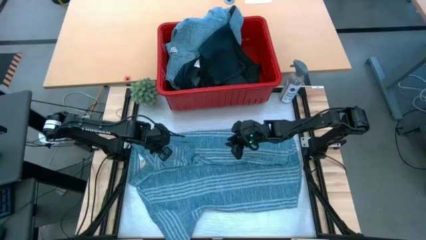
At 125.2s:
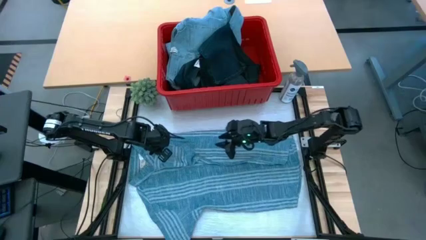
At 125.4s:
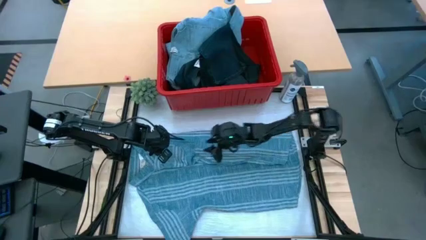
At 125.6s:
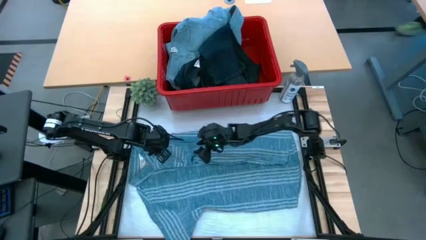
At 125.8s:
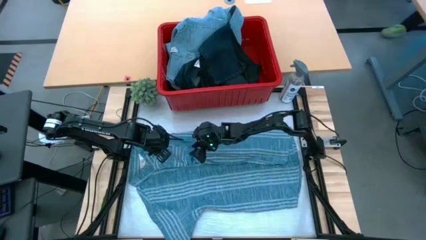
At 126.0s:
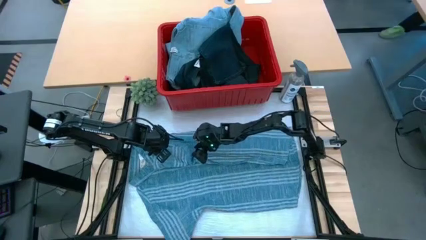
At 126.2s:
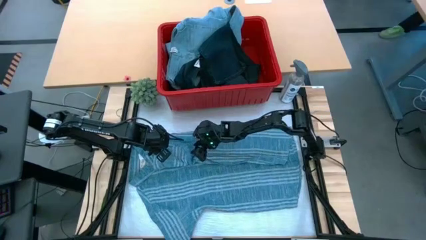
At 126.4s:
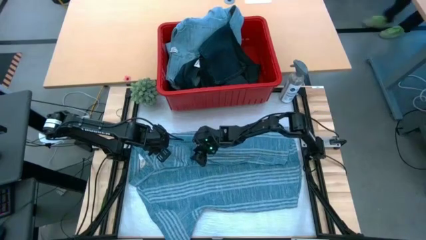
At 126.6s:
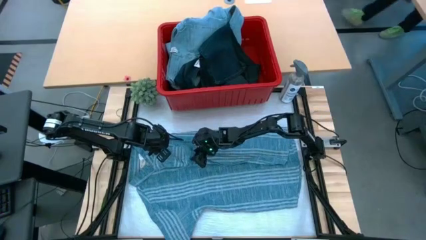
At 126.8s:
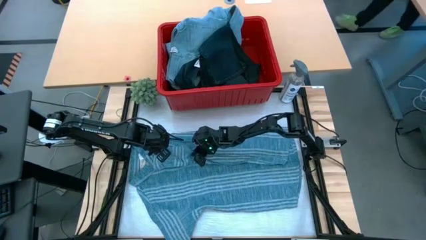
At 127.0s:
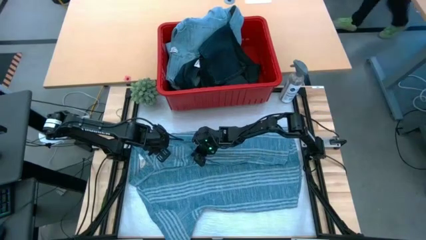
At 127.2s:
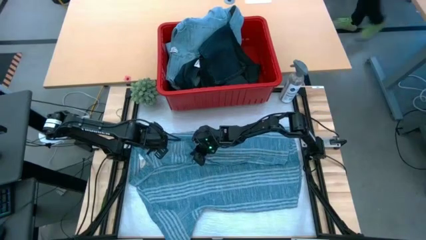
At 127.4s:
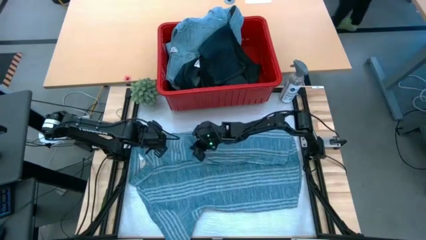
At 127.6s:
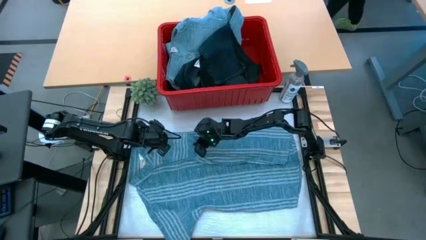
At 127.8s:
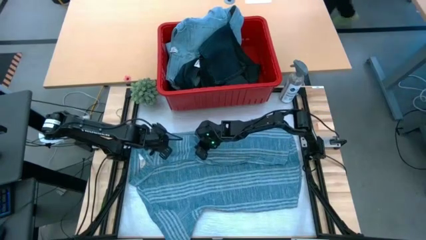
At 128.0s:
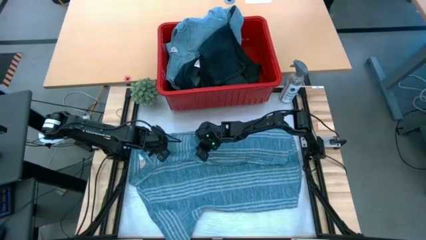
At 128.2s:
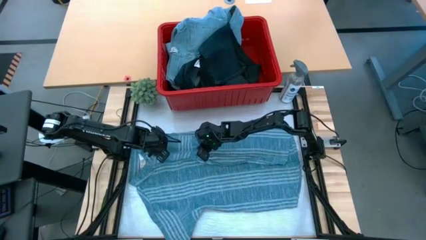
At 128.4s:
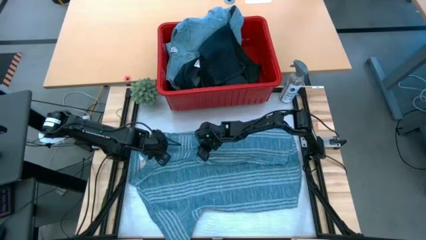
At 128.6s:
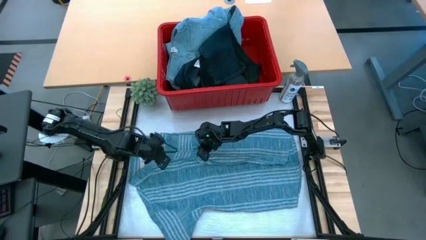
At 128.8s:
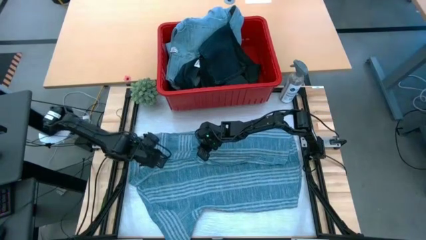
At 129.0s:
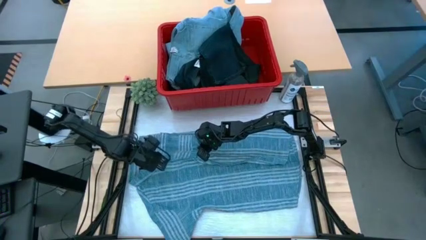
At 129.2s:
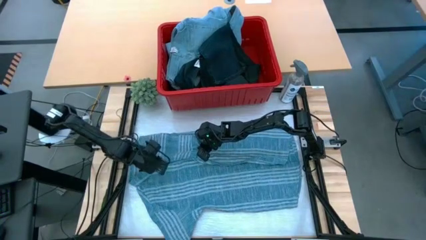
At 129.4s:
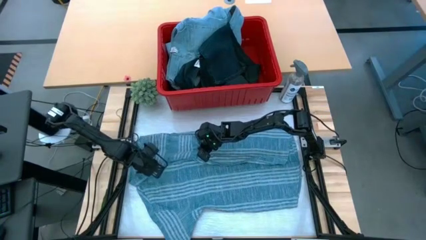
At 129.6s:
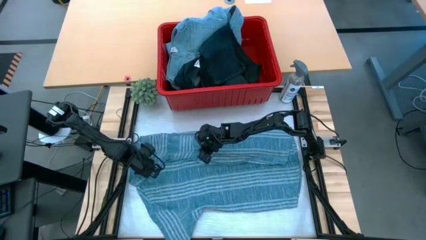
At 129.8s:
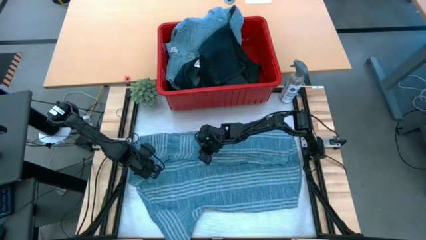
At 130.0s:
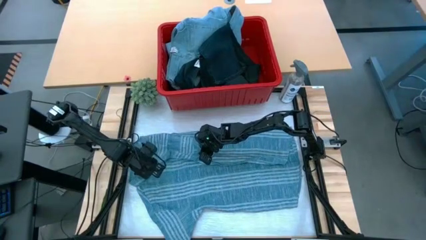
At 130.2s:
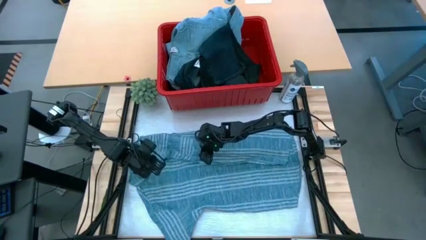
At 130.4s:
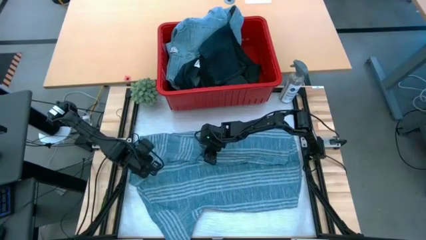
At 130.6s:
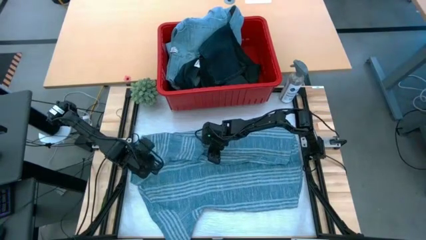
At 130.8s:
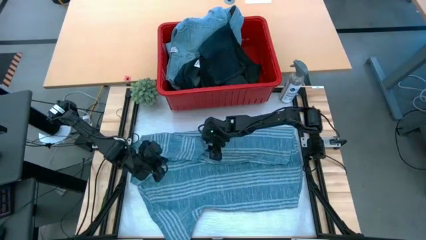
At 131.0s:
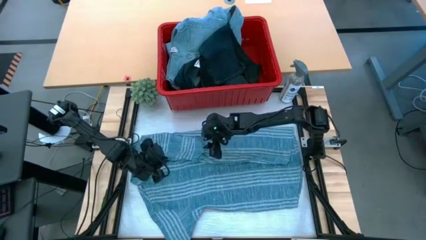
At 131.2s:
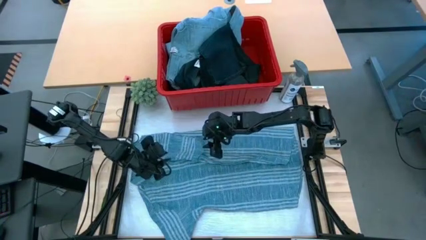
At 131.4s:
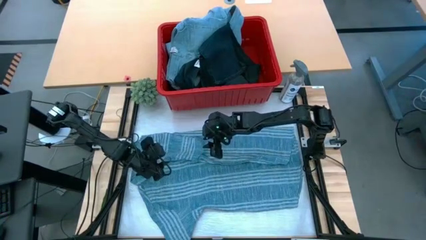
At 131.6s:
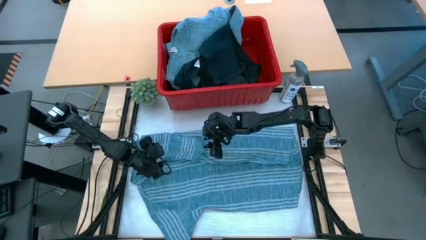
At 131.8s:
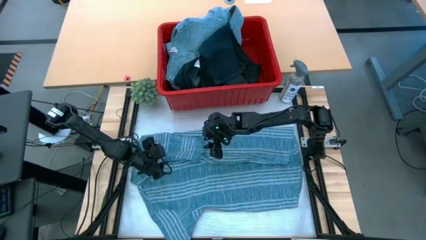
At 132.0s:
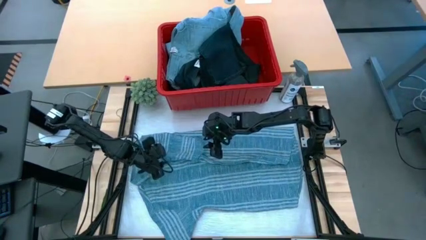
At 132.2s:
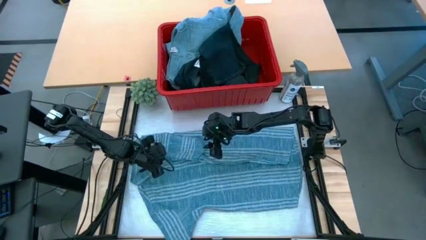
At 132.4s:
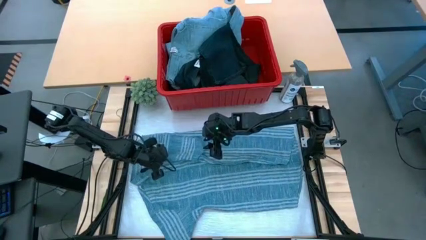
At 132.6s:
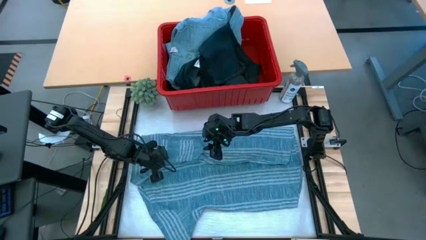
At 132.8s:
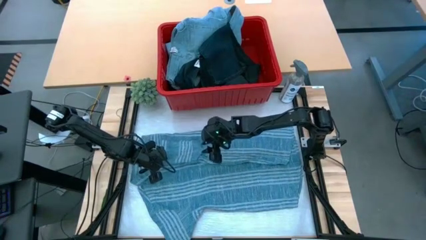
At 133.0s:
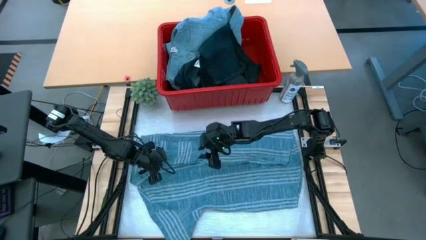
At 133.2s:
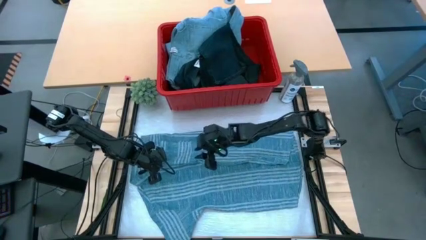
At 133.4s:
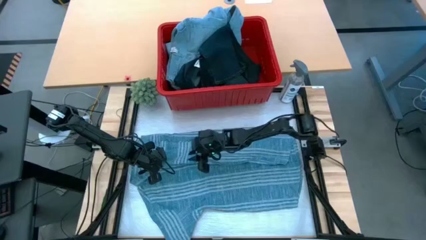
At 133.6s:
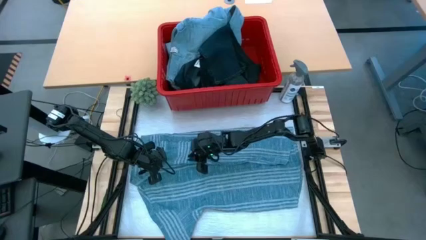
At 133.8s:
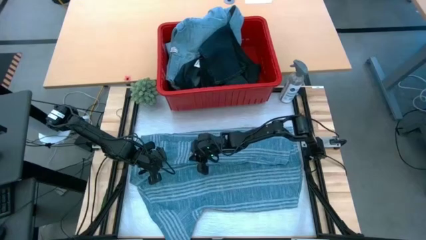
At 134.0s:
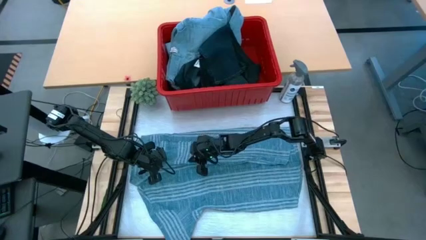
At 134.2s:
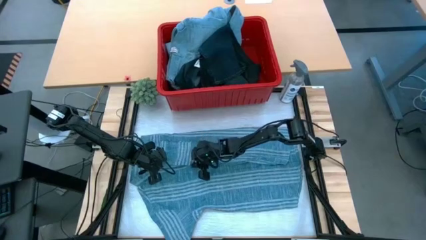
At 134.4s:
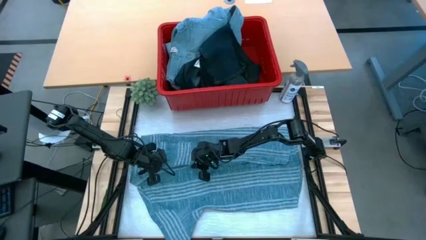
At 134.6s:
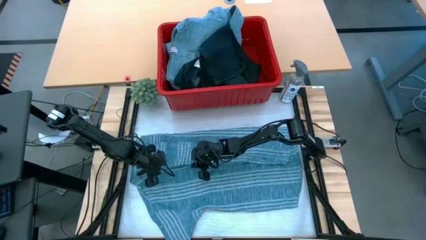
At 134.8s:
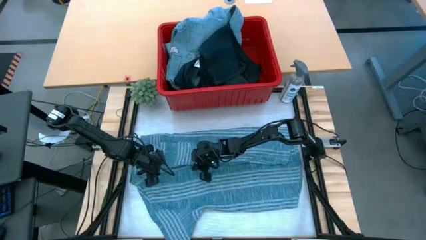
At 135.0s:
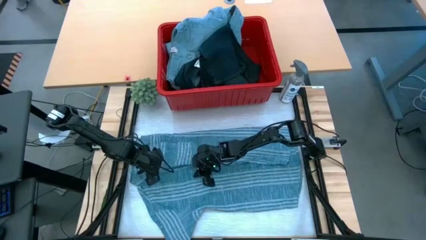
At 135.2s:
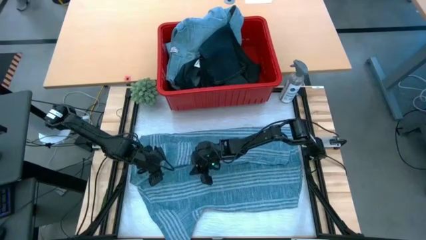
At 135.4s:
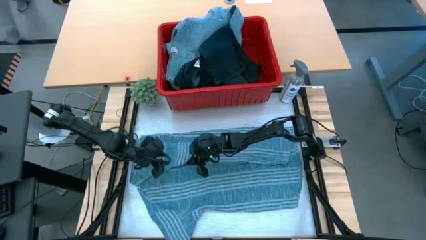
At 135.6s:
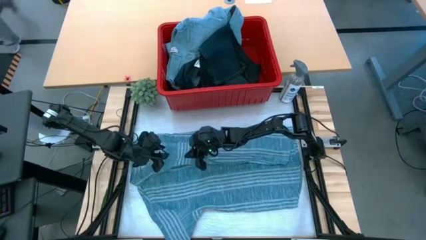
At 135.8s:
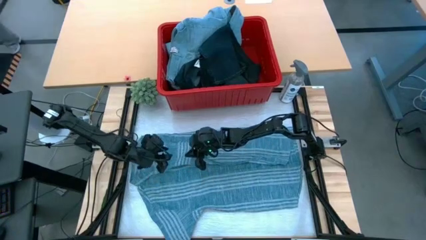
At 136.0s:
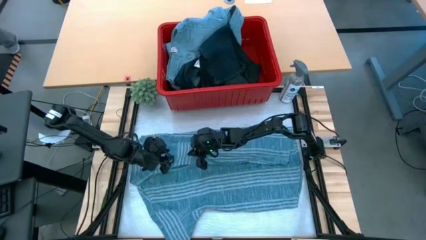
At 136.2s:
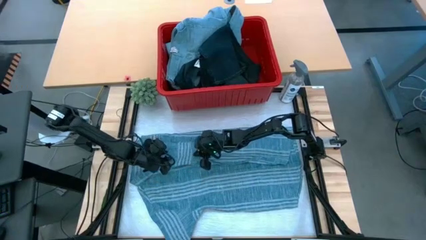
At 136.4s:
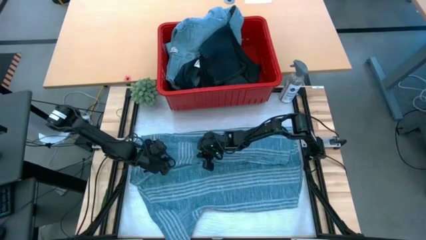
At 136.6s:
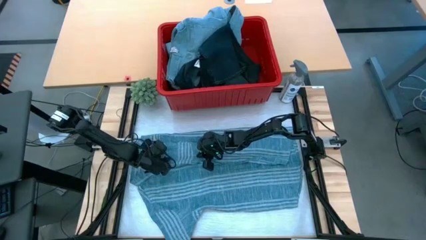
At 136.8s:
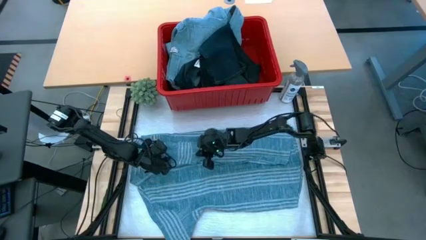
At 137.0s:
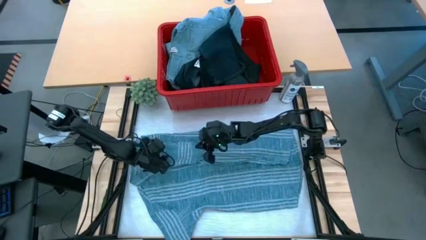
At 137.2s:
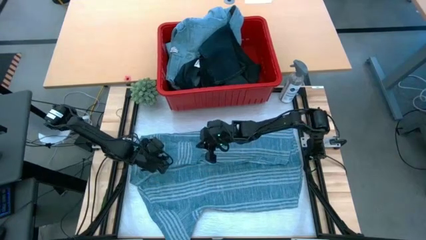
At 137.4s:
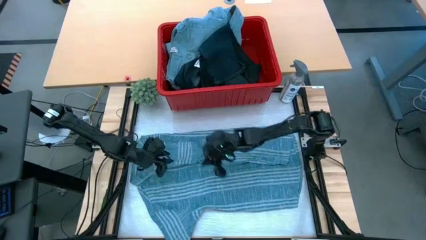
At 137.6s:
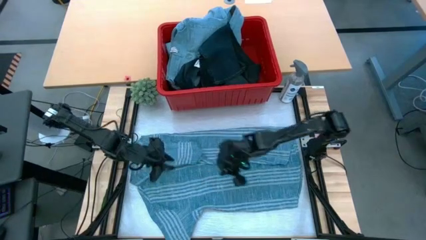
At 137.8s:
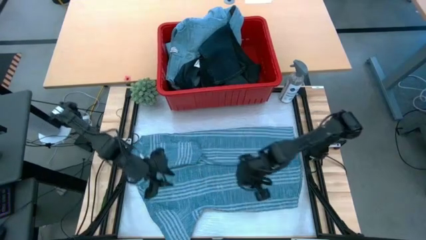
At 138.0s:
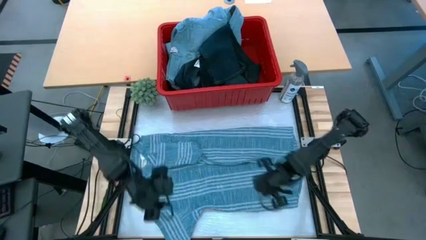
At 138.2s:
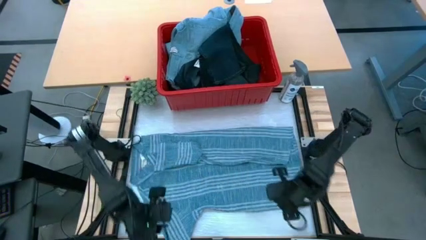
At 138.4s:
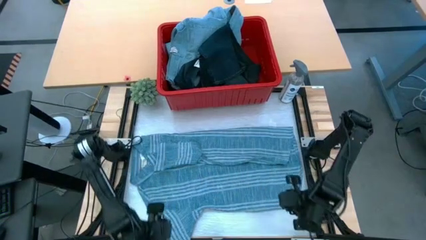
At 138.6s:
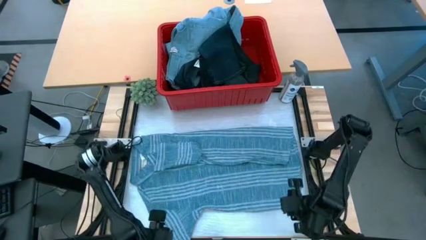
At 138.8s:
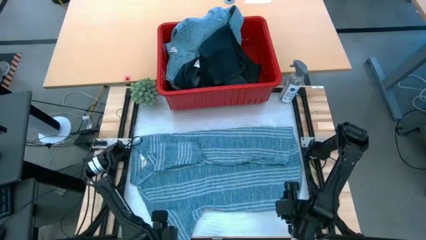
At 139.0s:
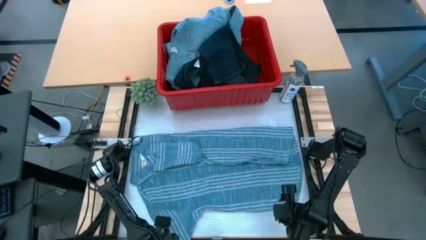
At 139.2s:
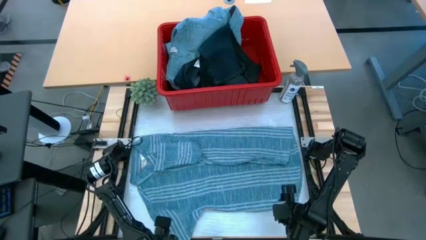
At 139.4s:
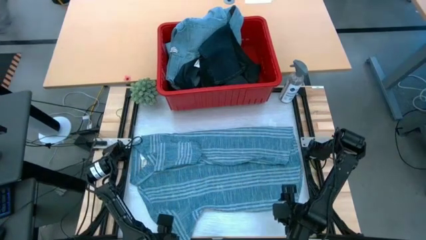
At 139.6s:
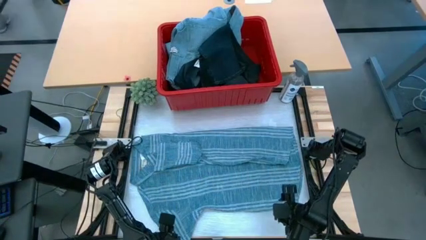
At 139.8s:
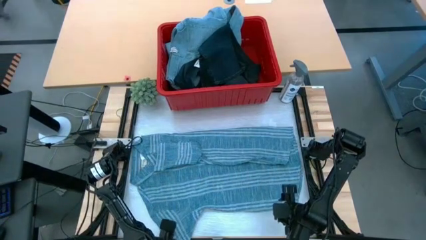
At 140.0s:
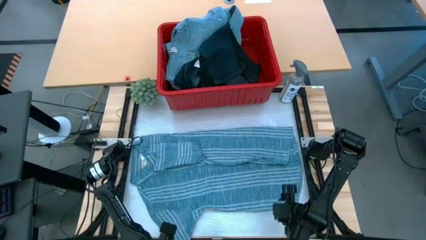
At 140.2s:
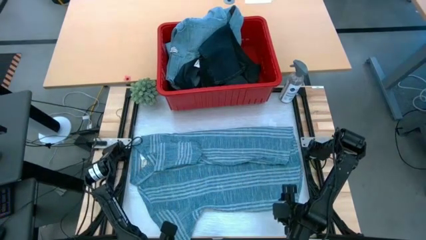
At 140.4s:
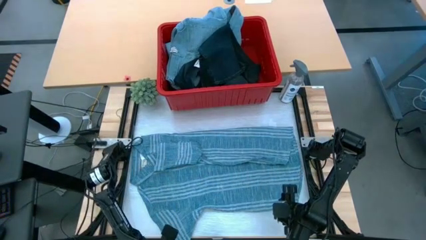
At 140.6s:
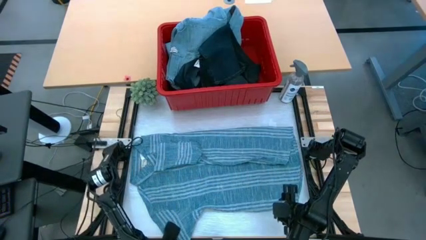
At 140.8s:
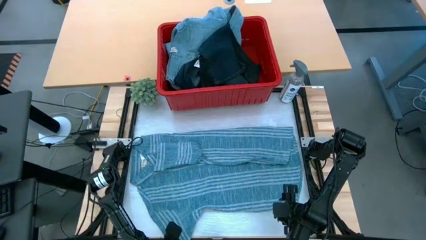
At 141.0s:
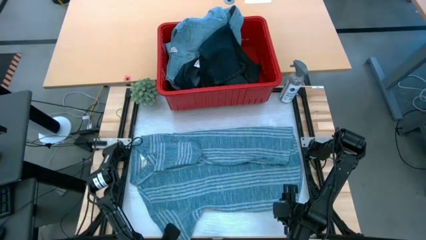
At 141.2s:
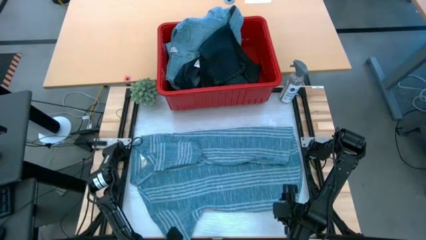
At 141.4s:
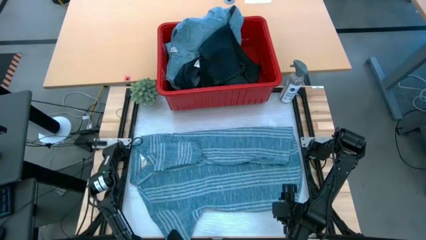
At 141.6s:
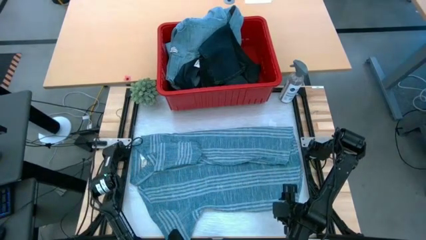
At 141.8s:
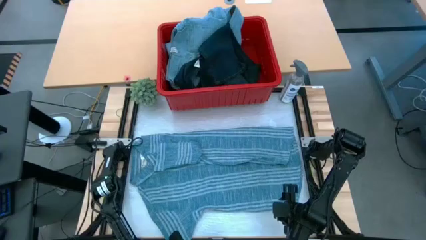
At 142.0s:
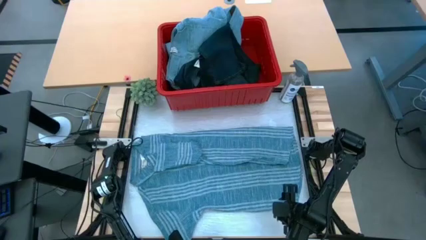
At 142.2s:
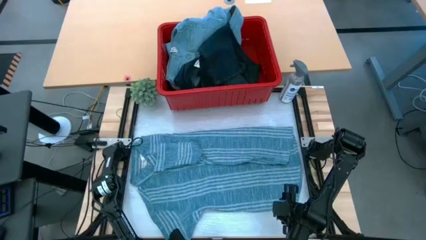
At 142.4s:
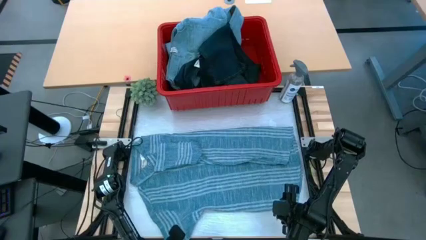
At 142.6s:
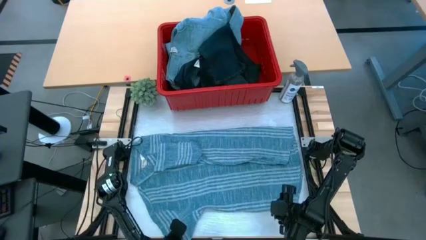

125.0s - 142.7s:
Task: Fold Laundry from Bin
Fold the blue polo shirt
